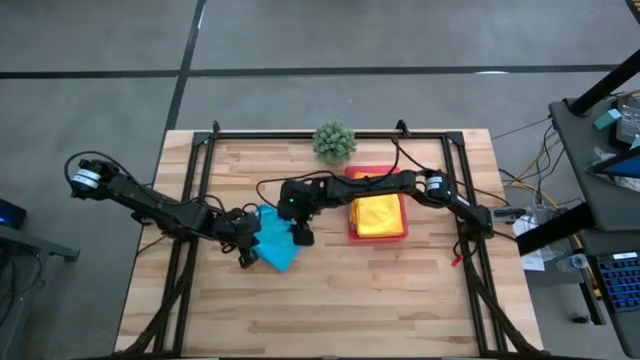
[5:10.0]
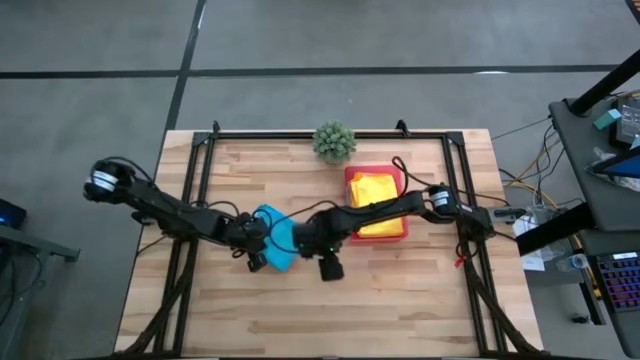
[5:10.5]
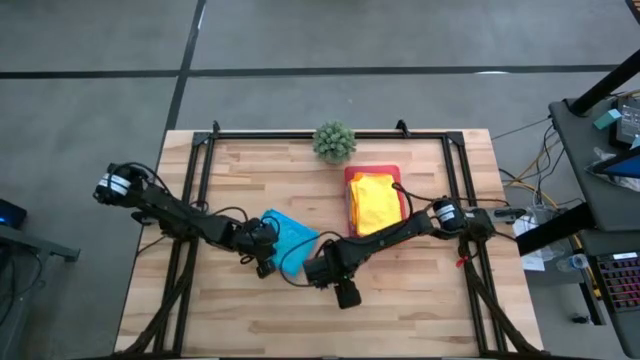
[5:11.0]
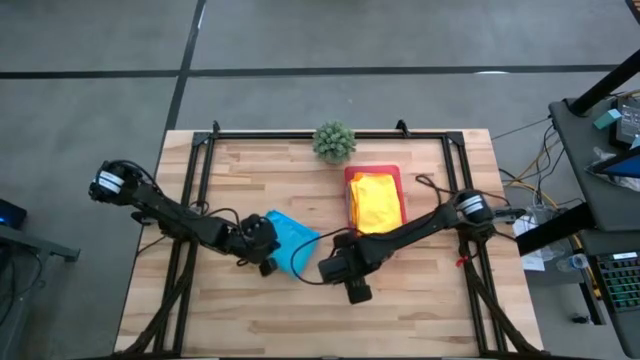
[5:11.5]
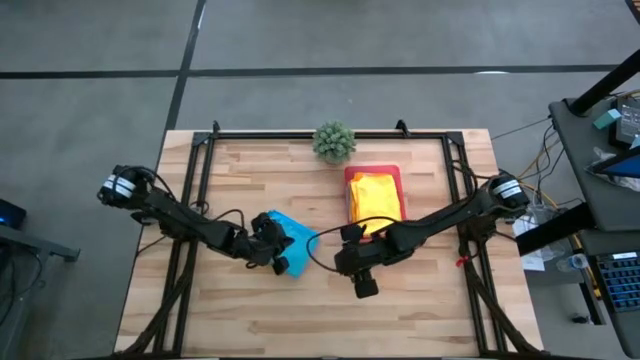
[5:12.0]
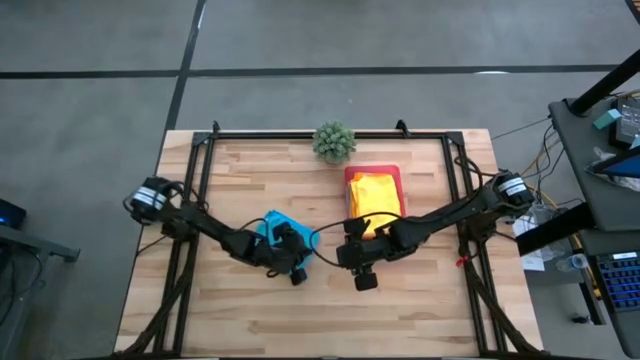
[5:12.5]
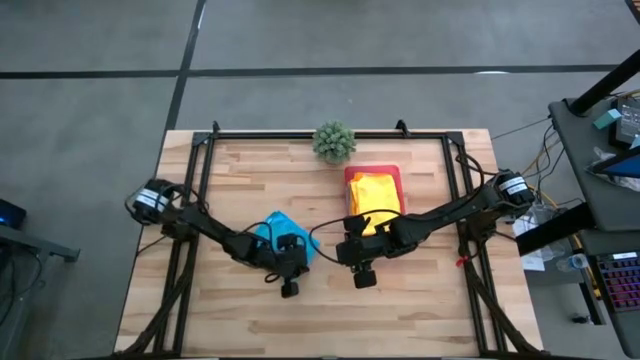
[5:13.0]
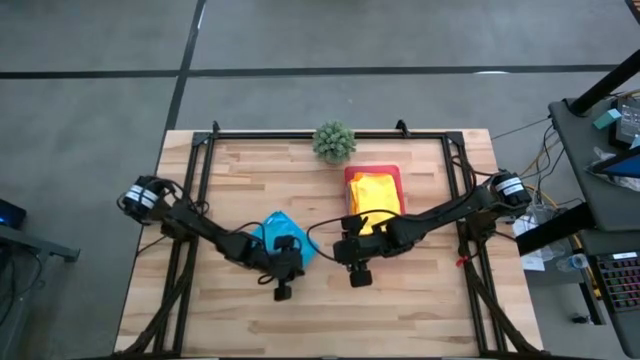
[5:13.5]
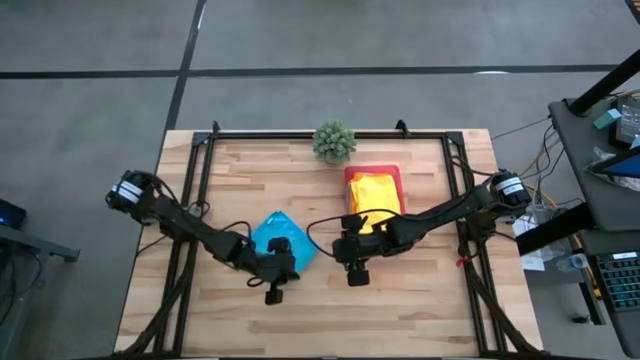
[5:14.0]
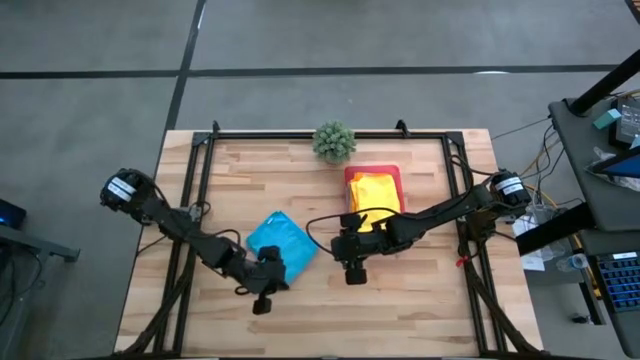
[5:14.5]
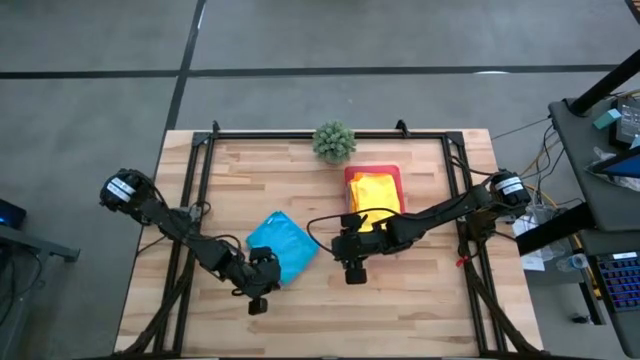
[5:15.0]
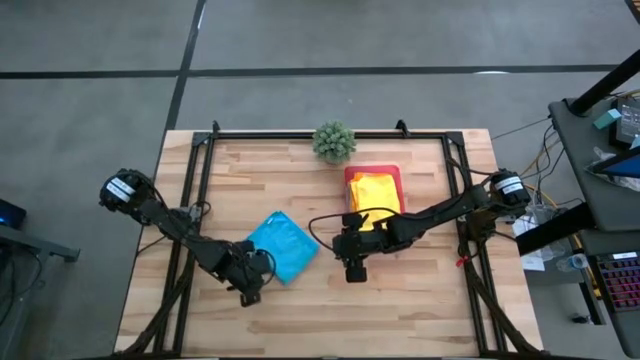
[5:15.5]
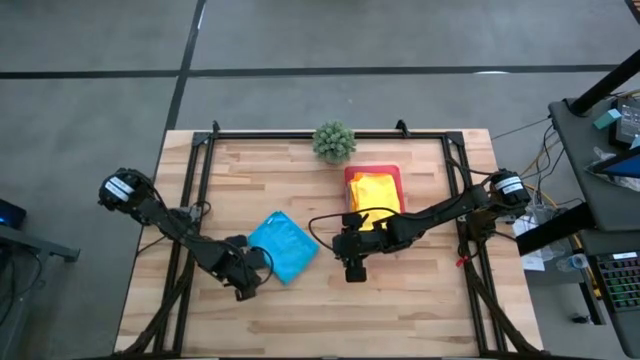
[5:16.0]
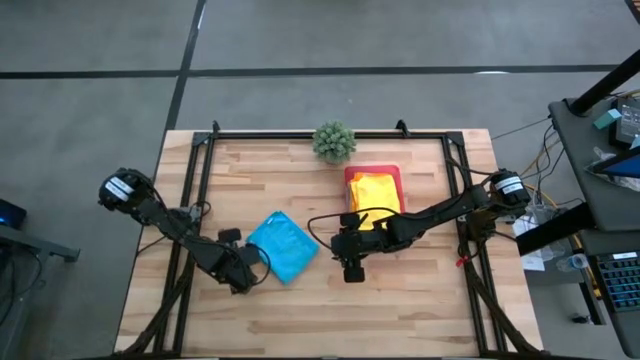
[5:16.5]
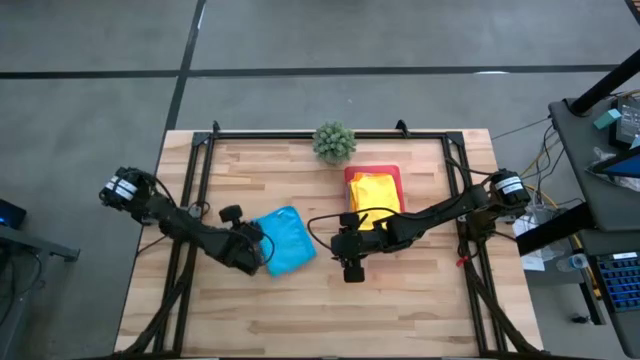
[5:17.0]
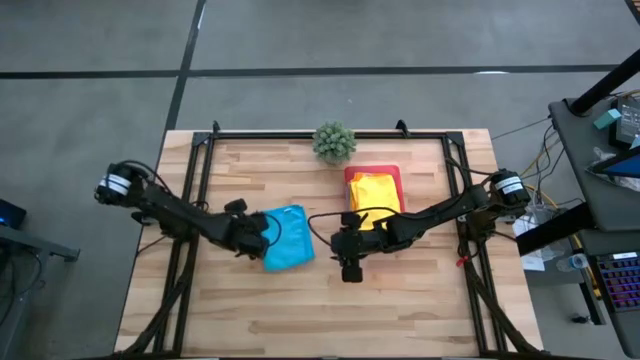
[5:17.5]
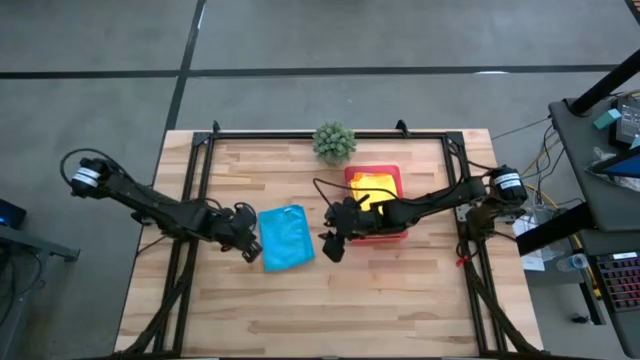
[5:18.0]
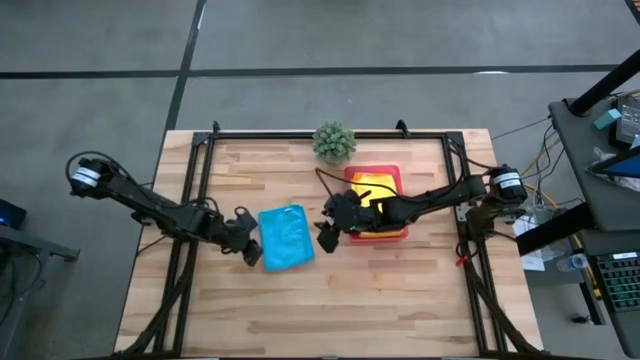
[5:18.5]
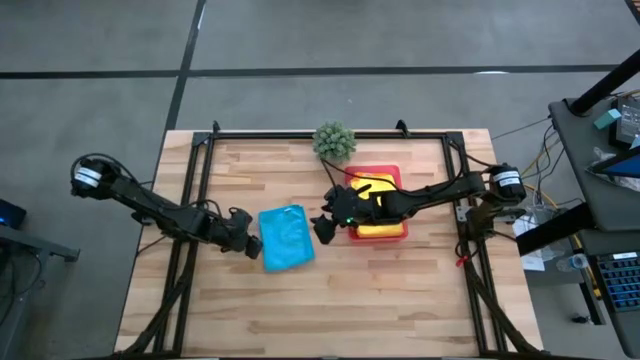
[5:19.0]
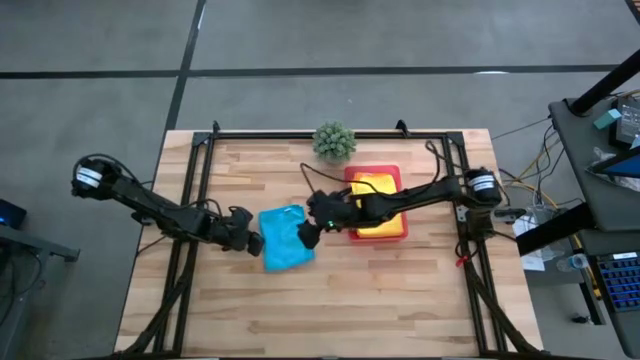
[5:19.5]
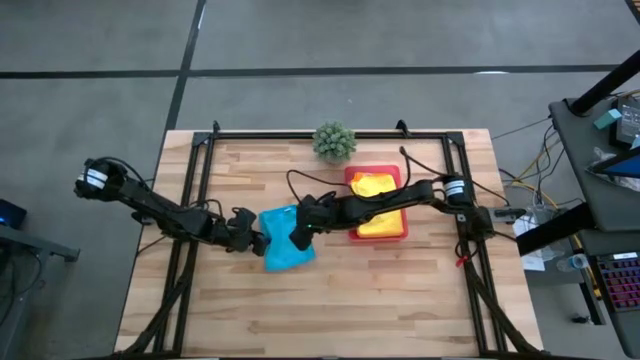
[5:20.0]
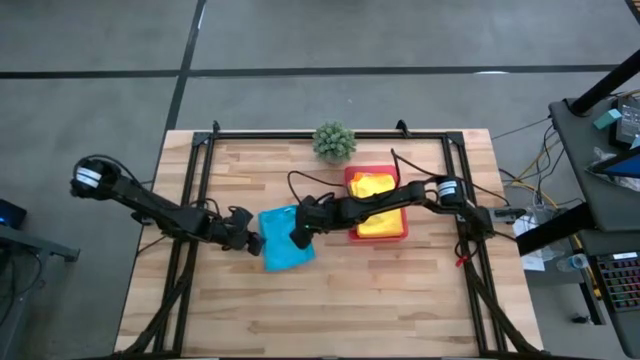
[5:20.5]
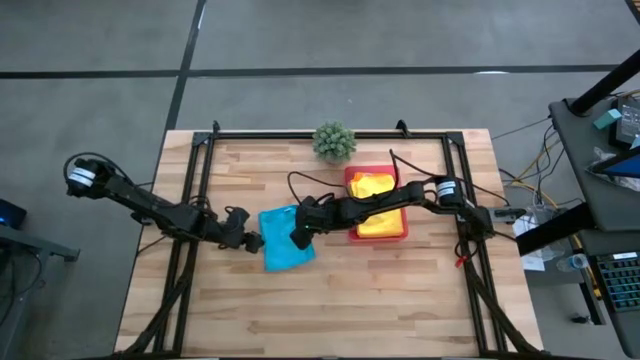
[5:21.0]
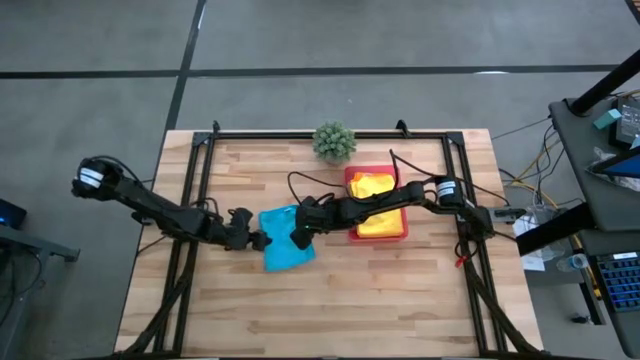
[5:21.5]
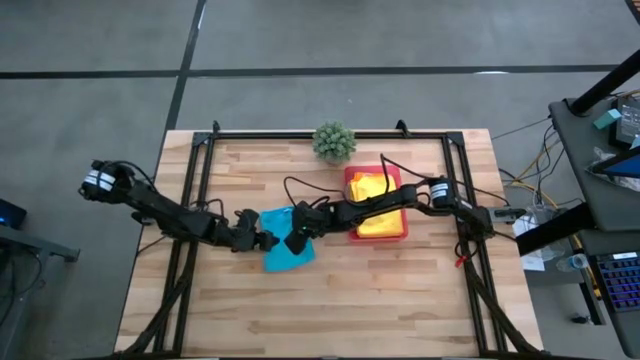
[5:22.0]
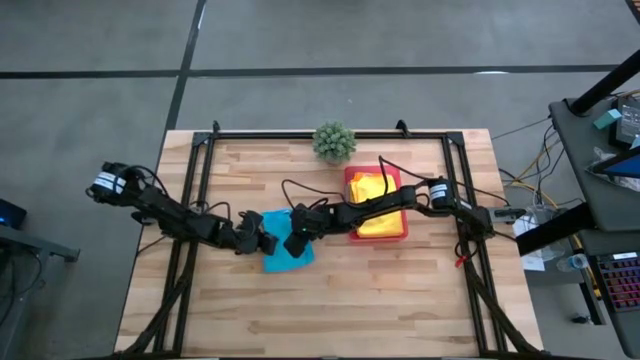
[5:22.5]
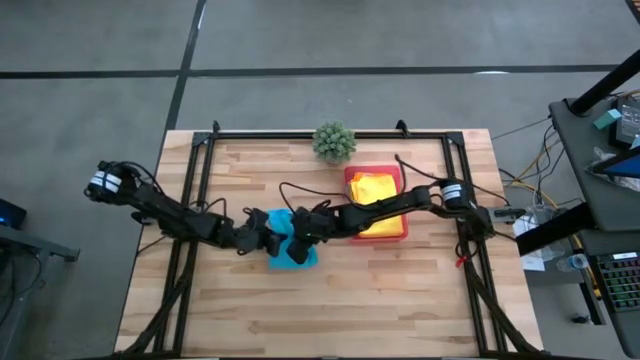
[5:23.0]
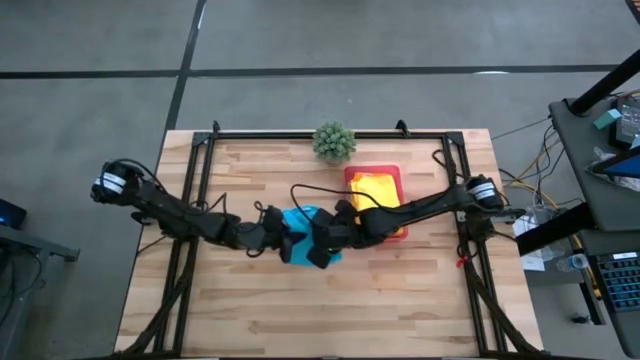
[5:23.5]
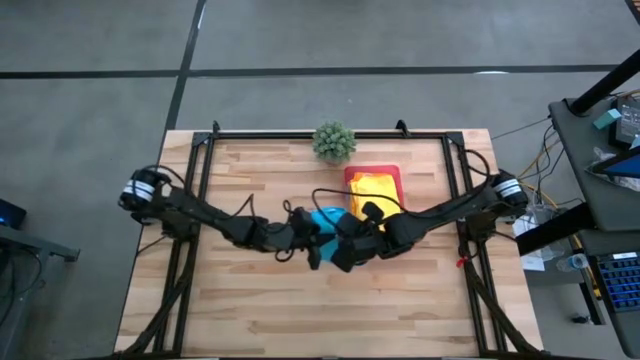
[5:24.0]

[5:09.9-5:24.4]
Task: Fold microfiber towels
Put the blue towel into the red bin

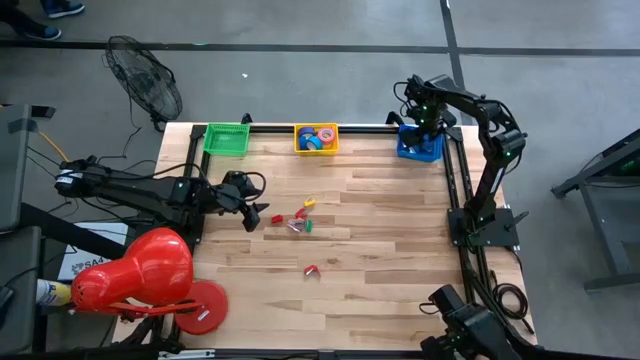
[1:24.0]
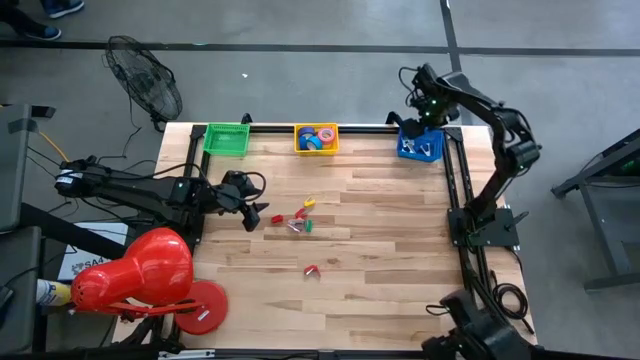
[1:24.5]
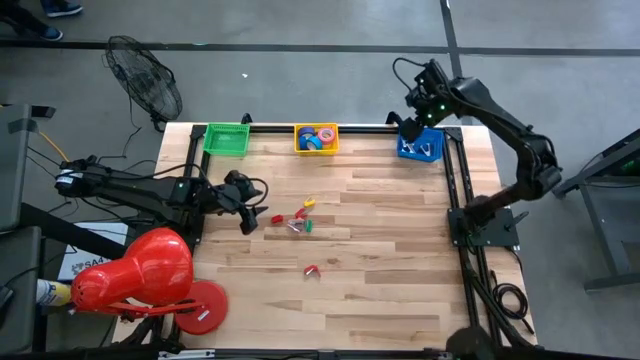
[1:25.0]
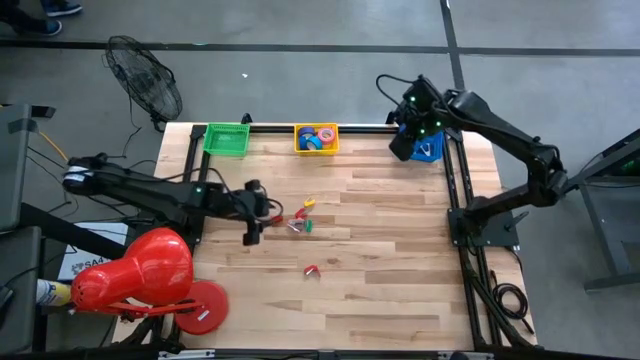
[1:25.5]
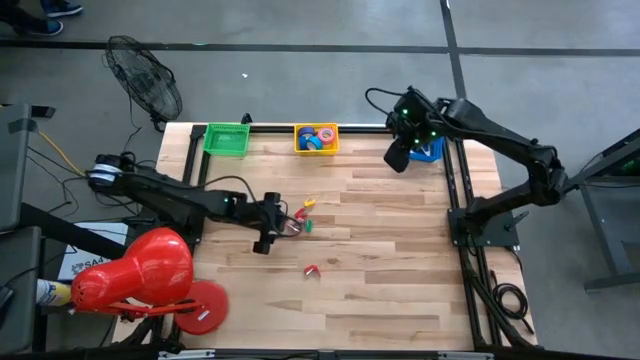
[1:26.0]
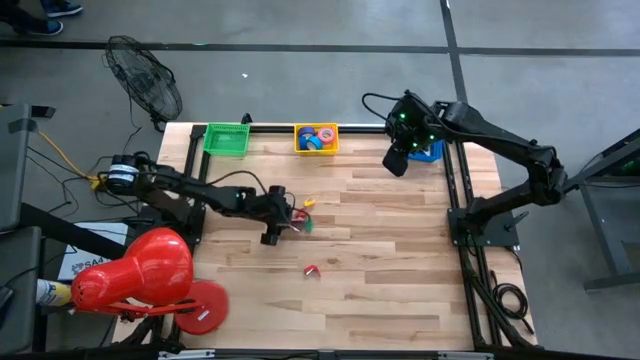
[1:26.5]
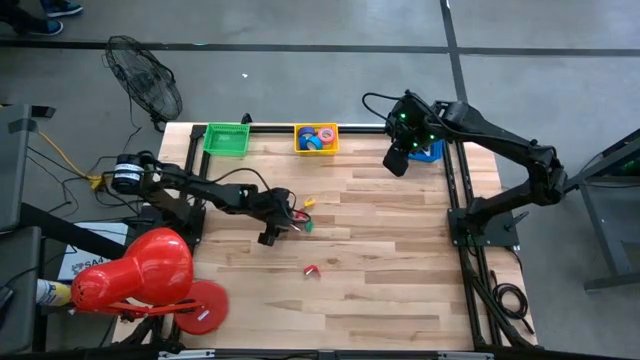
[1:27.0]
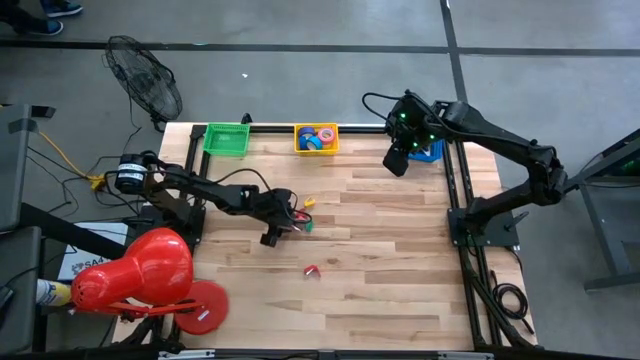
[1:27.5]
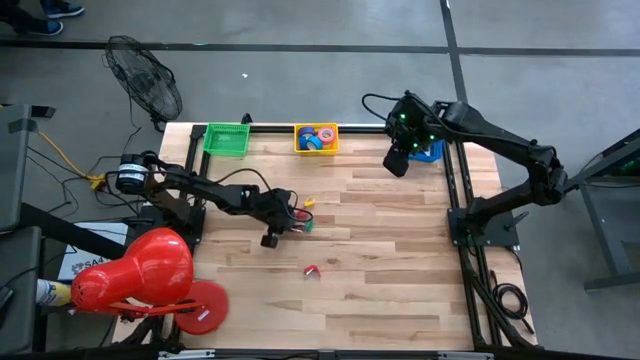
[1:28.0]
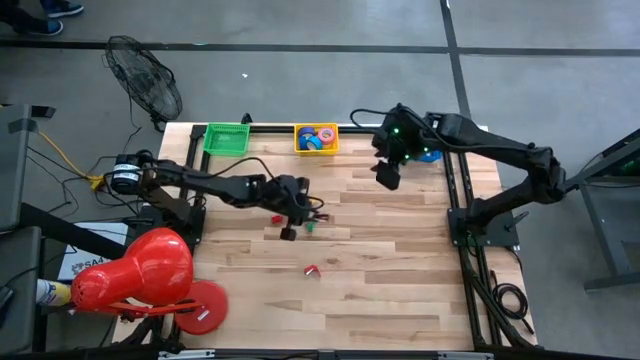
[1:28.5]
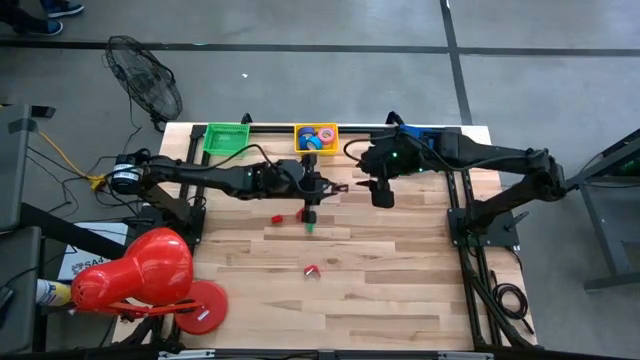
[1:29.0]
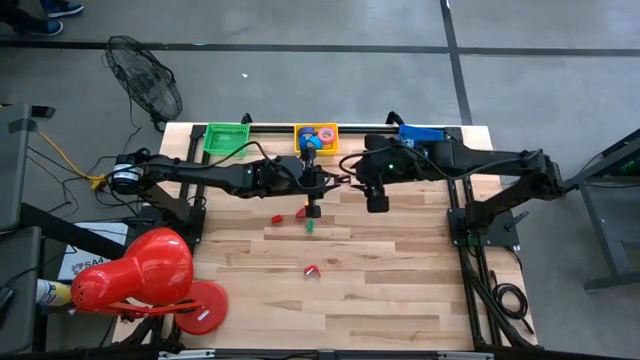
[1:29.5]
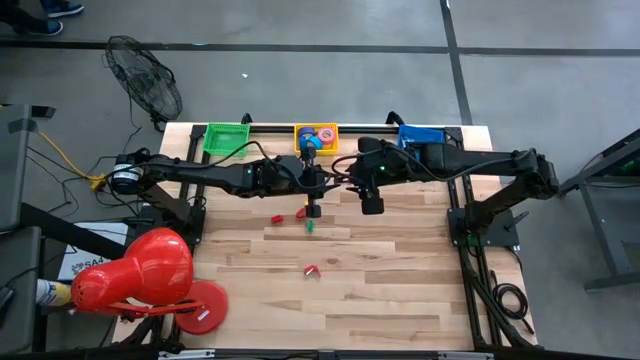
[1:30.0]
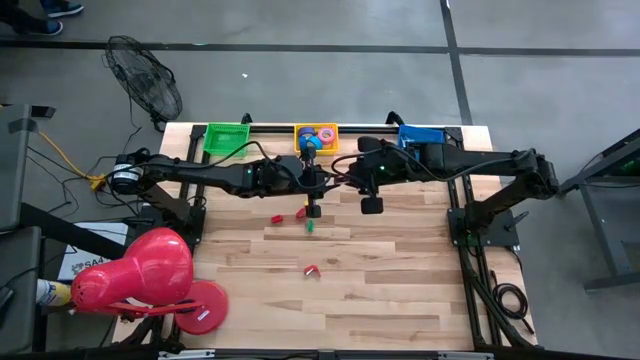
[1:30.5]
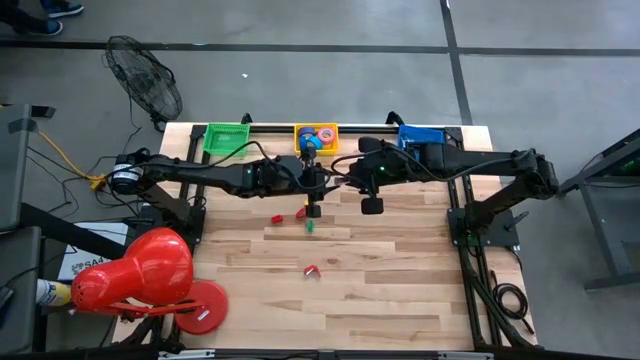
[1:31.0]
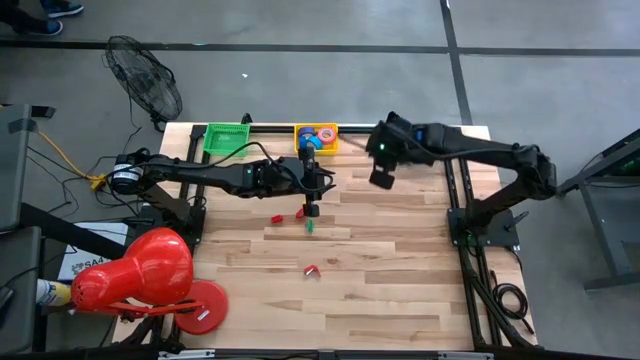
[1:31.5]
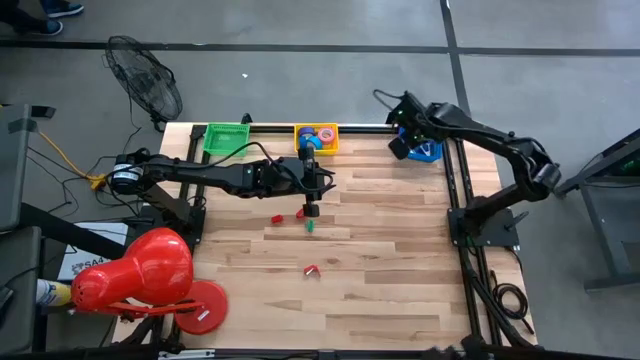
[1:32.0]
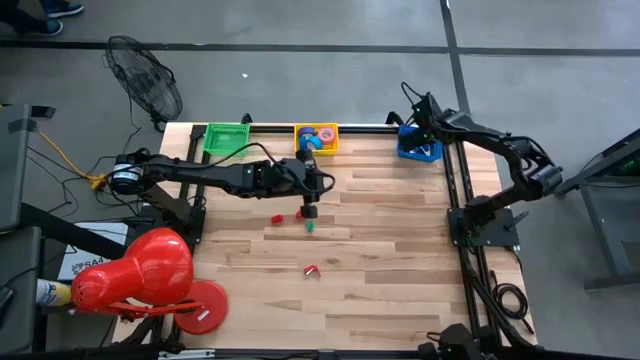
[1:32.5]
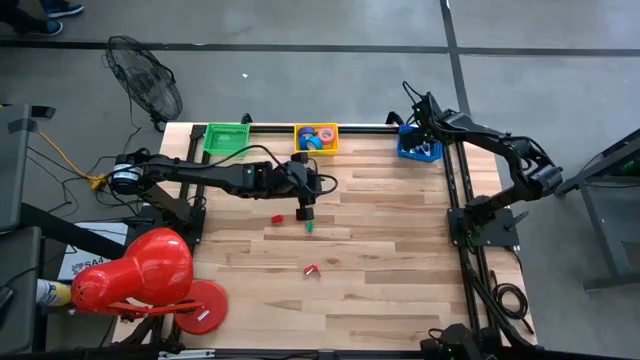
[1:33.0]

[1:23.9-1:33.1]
Task: Pick and place Stapler, Stapler remover, tape
Put the pink staple remover into the blue bin
